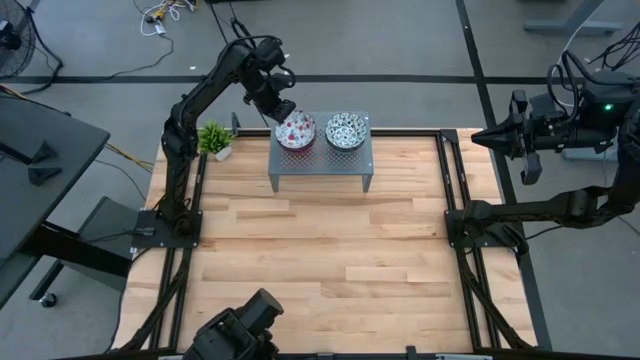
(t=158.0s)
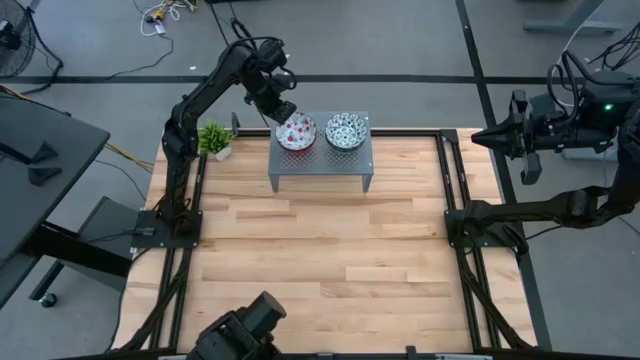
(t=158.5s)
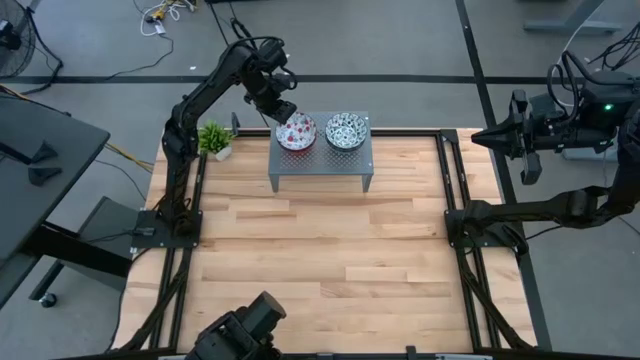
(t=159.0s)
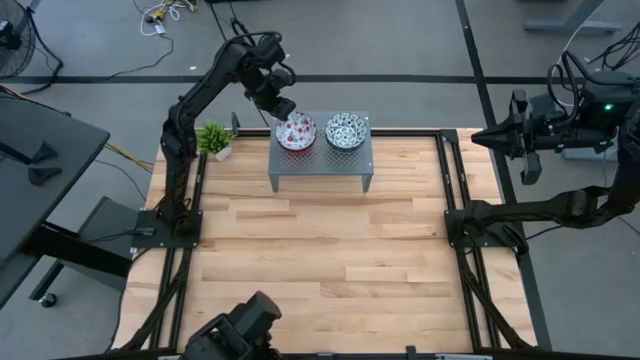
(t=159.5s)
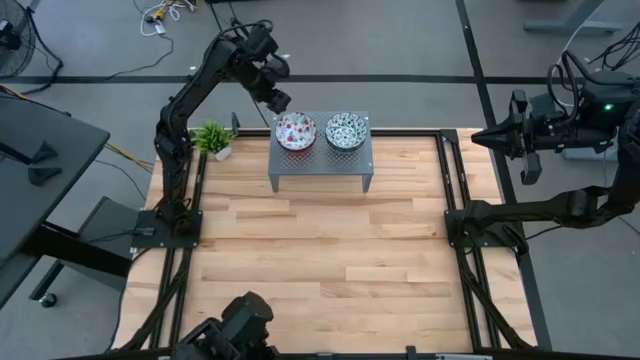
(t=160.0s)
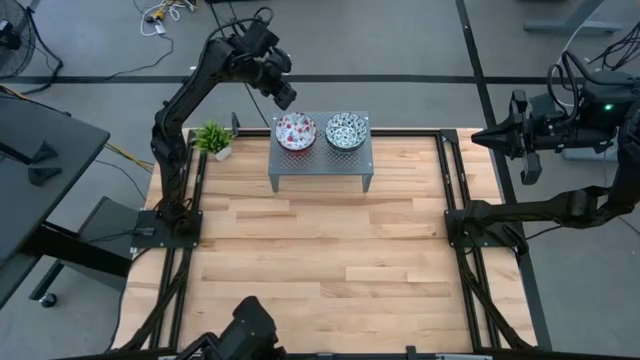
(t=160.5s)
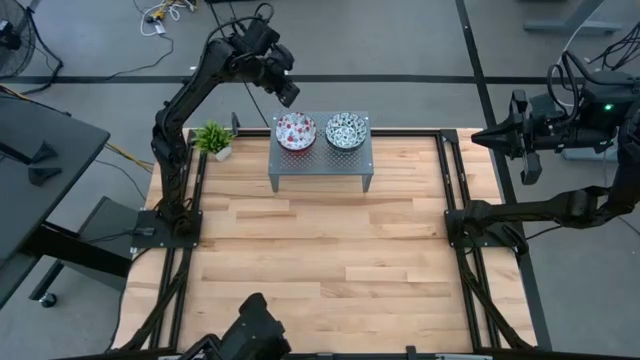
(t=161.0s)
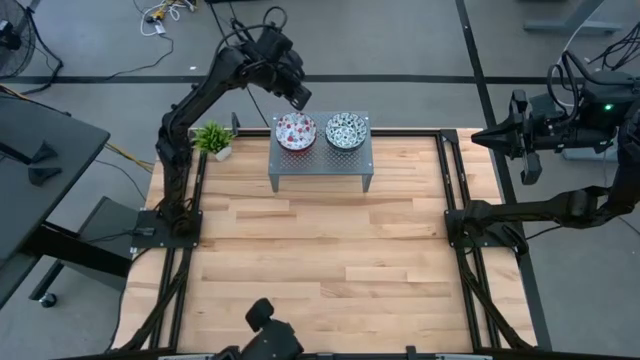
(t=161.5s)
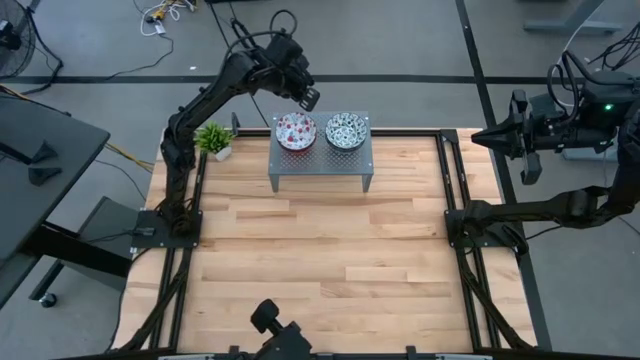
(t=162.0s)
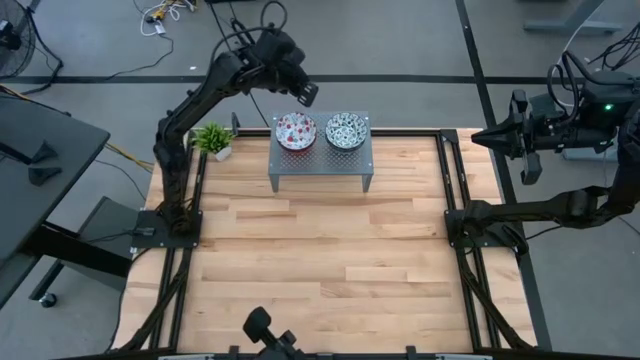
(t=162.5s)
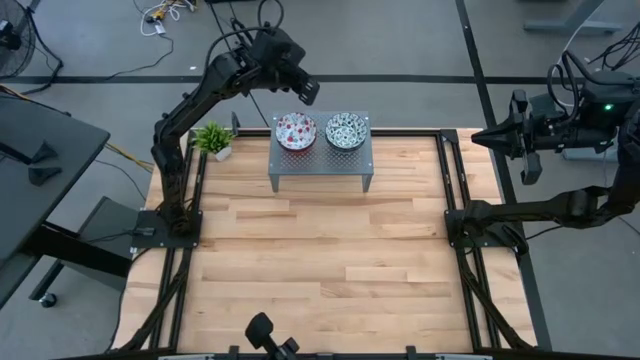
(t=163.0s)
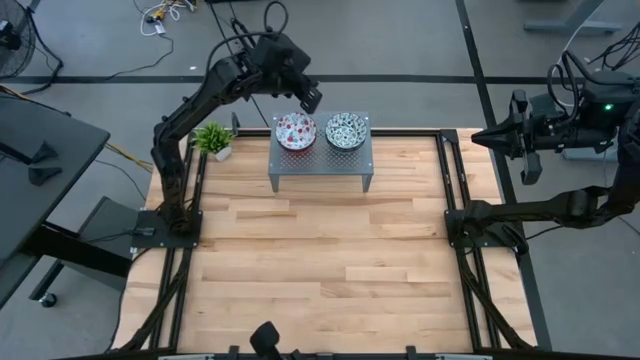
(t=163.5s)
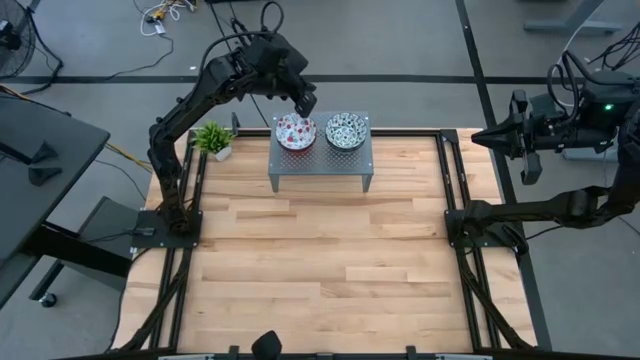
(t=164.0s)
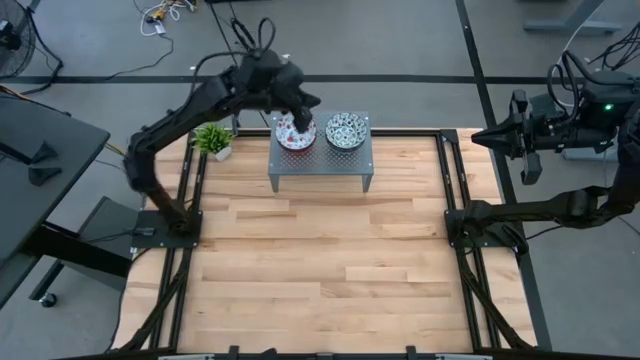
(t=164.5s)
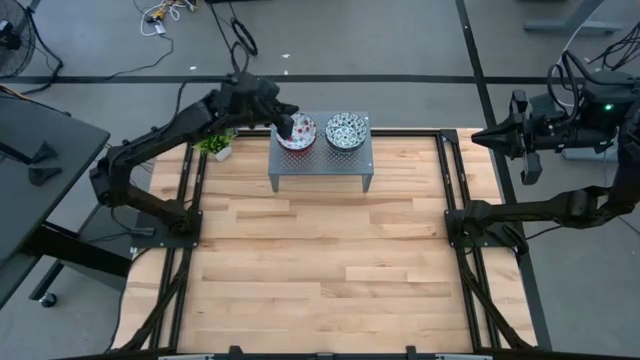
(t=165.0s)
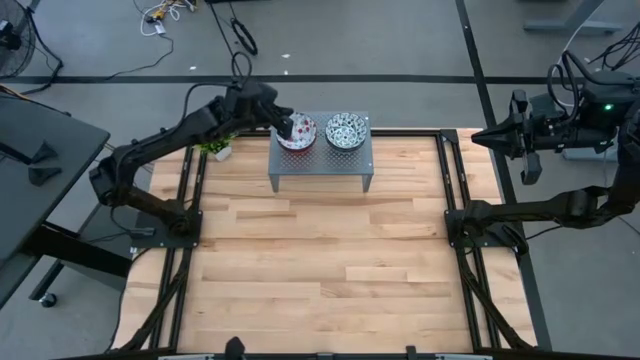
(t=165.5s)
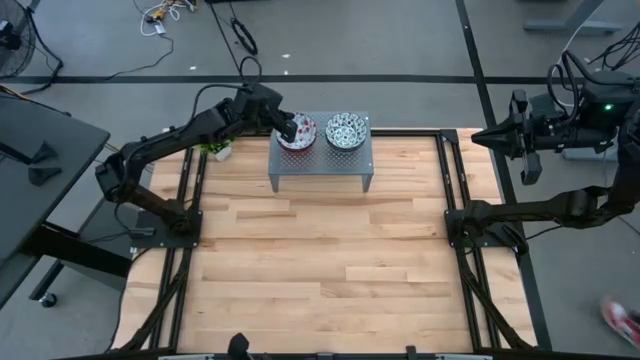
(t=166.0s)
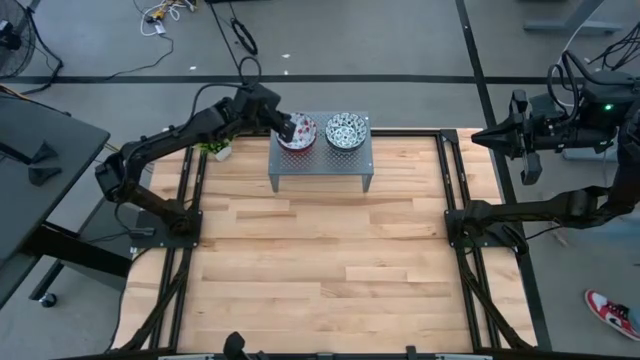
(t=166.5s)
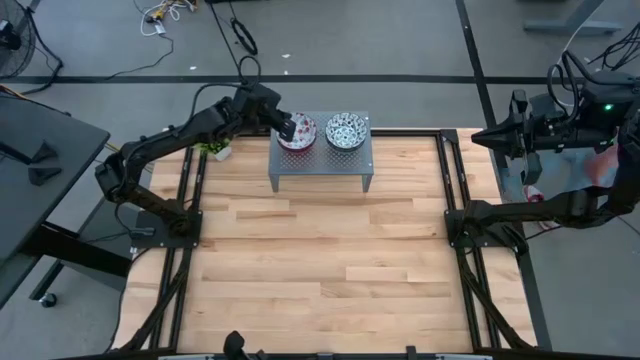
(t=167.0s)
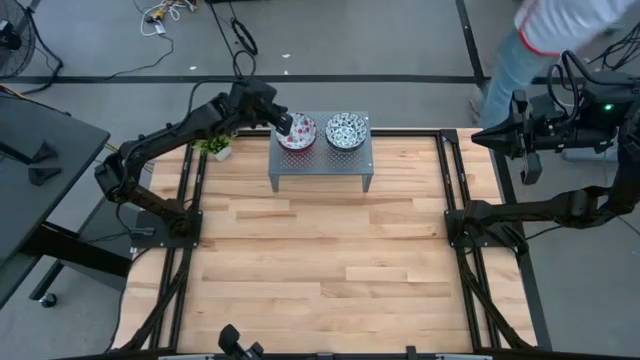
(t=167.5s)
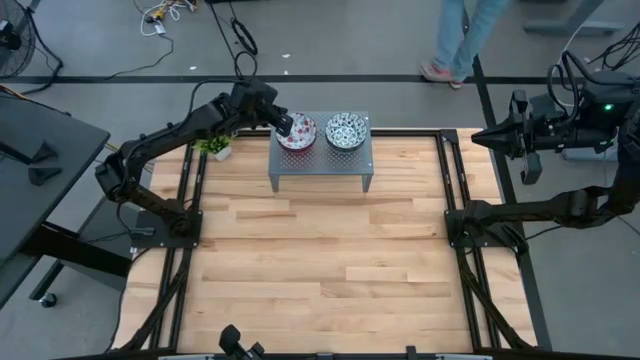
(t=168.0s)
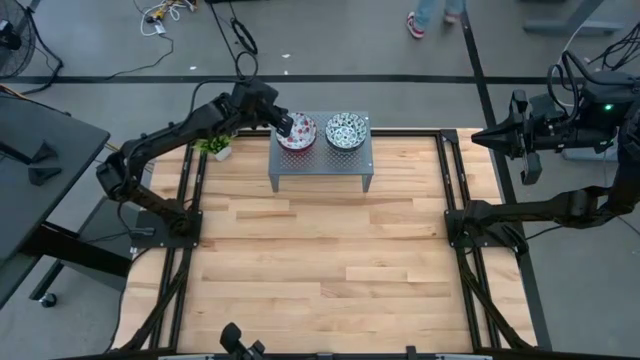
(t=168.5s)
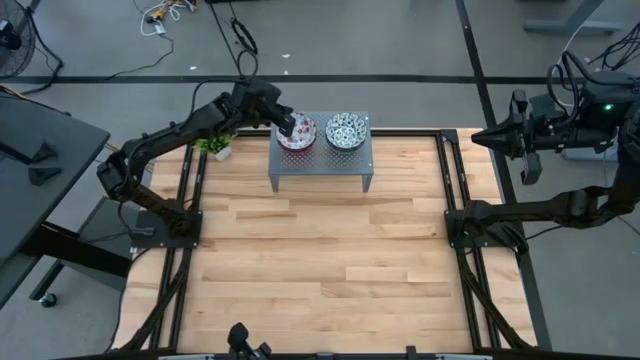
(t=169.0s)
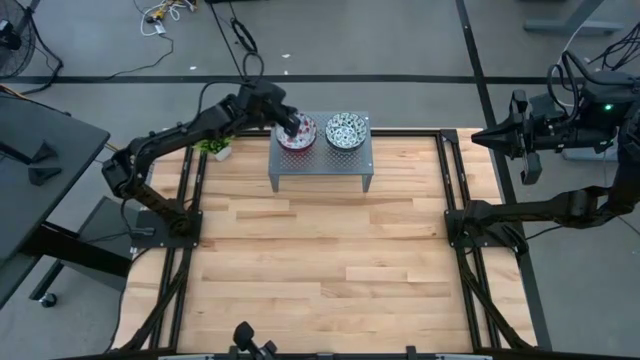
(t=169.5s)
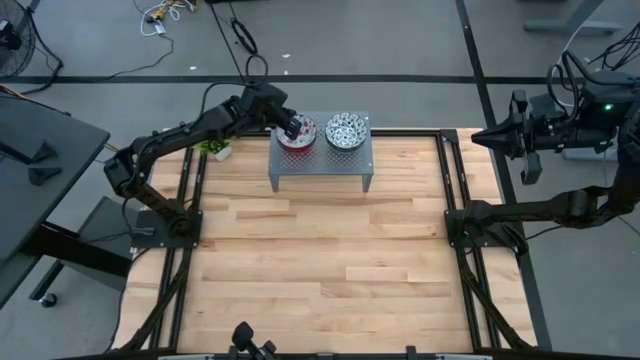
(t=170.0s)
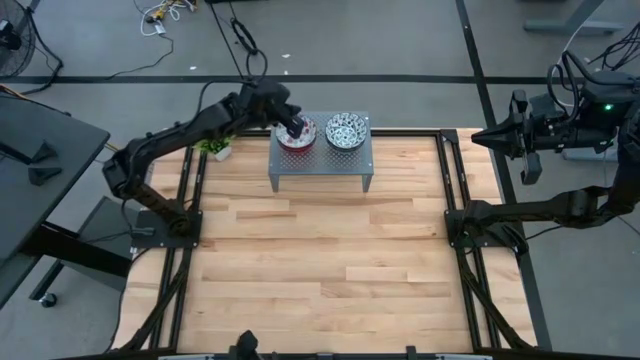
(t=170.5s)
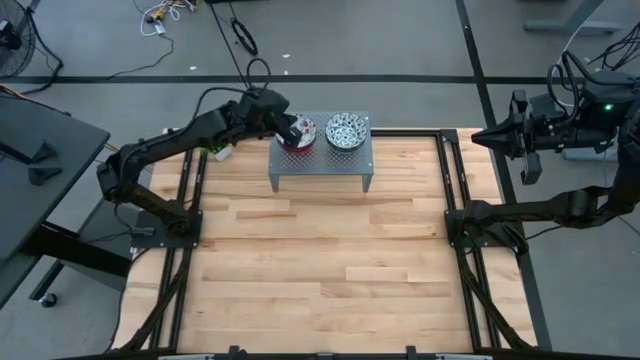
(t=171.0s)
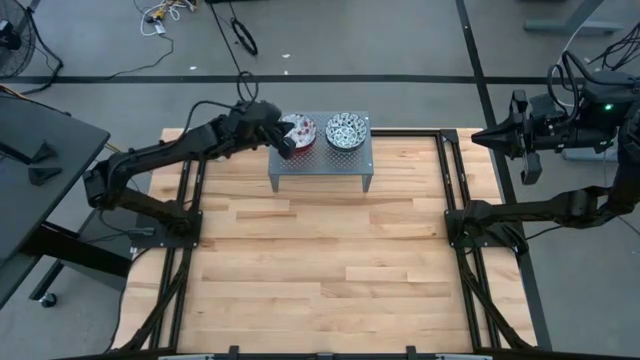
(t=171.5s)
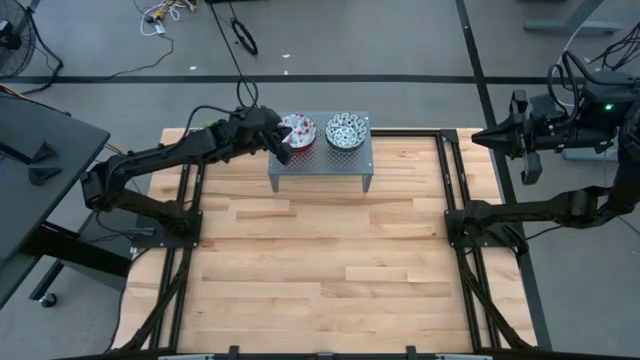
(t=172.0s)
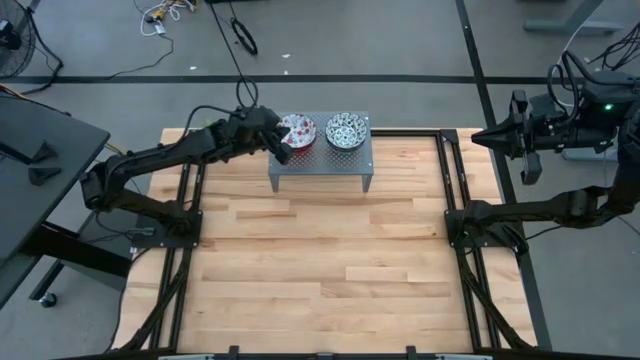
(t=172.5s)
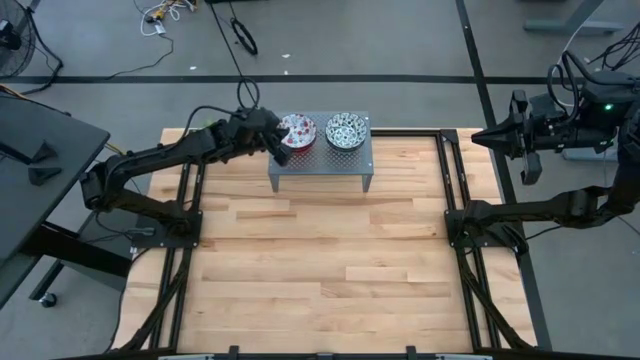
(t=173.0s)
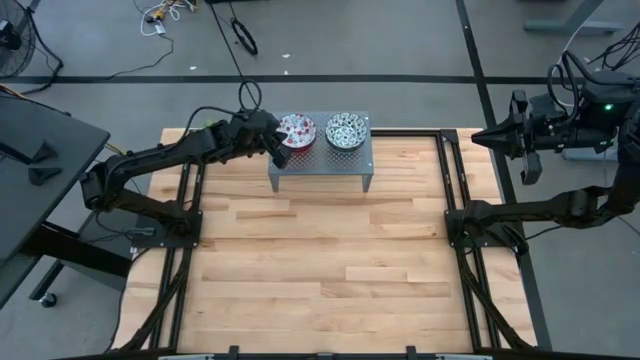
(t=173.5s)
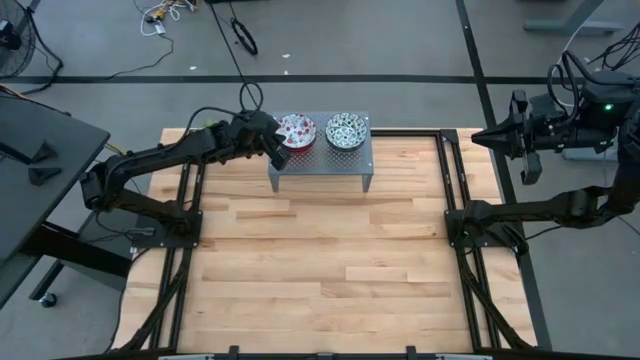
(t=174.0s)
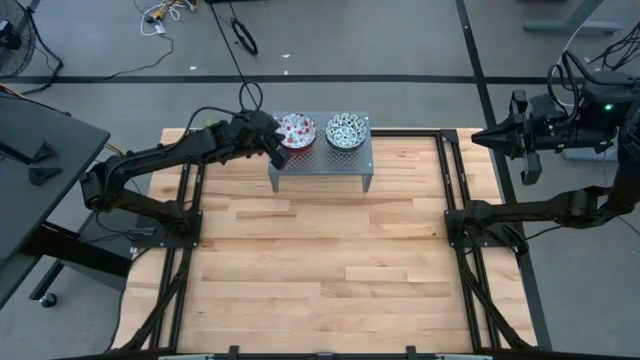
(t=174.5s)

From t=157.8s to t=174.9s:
Task: Pick & Place Mini bowls
Stack the red and white patterned bowl on top of the other red and white patterned bowls on the shelf

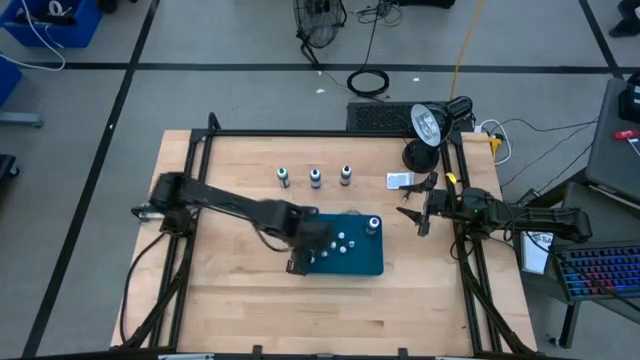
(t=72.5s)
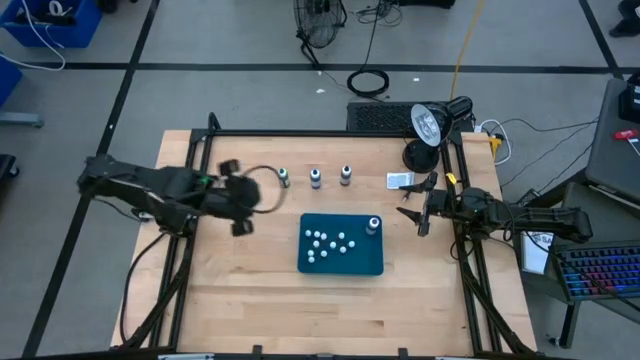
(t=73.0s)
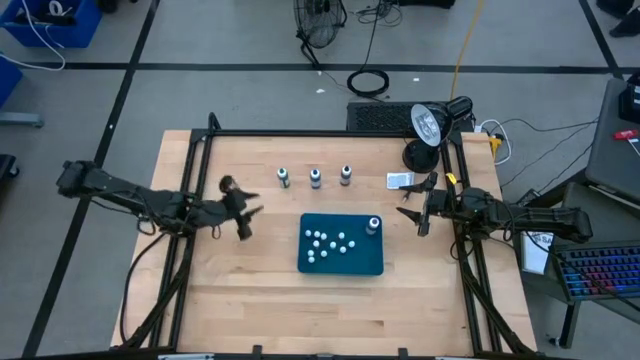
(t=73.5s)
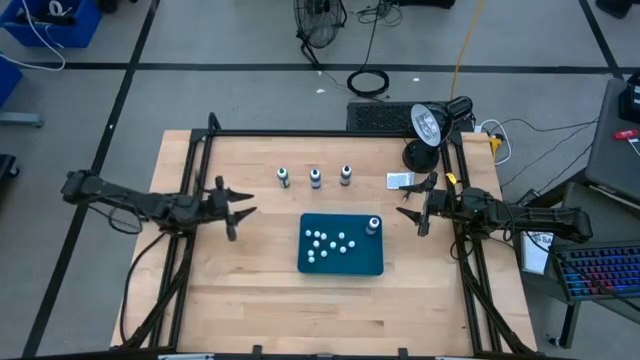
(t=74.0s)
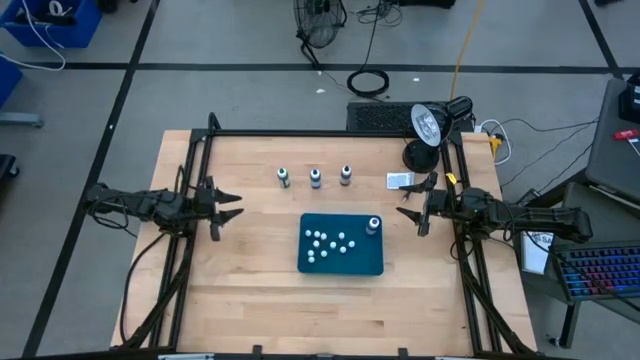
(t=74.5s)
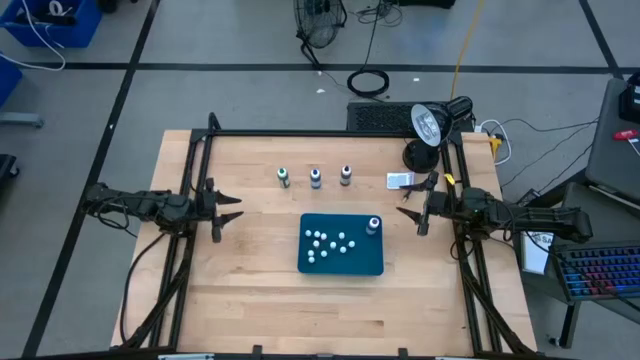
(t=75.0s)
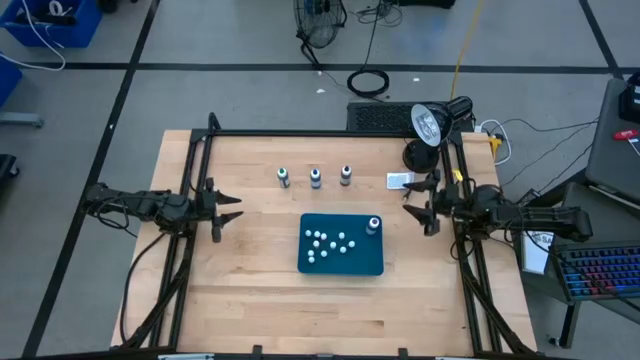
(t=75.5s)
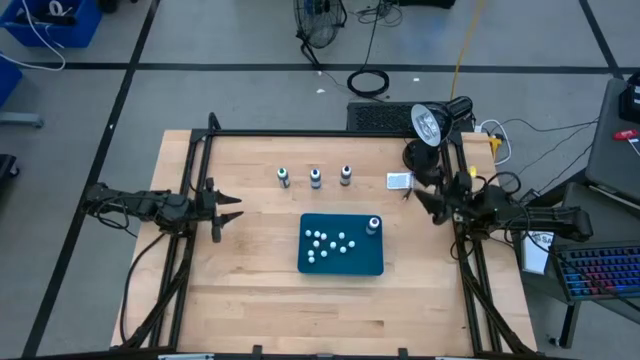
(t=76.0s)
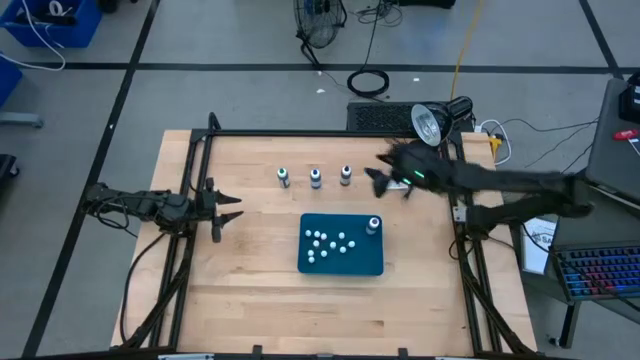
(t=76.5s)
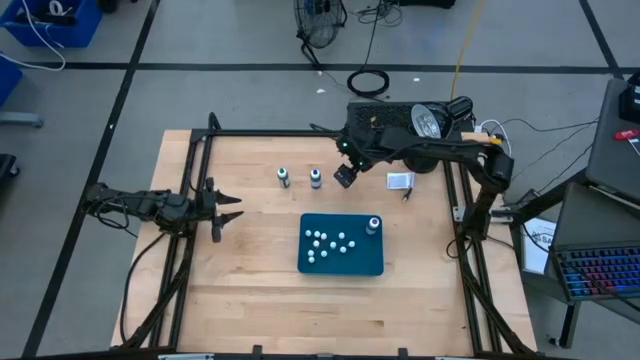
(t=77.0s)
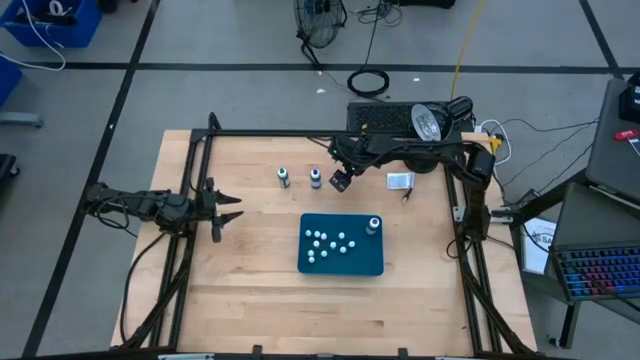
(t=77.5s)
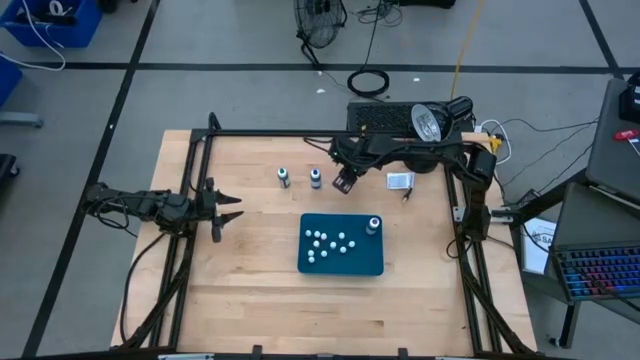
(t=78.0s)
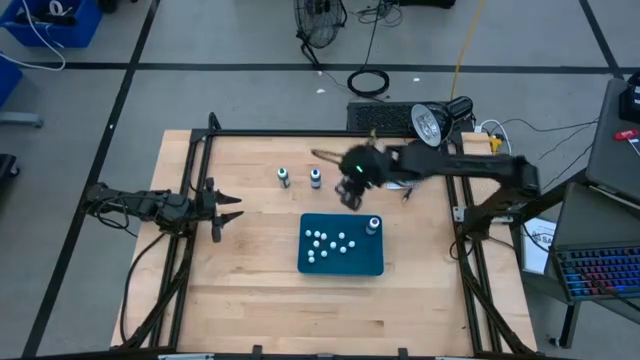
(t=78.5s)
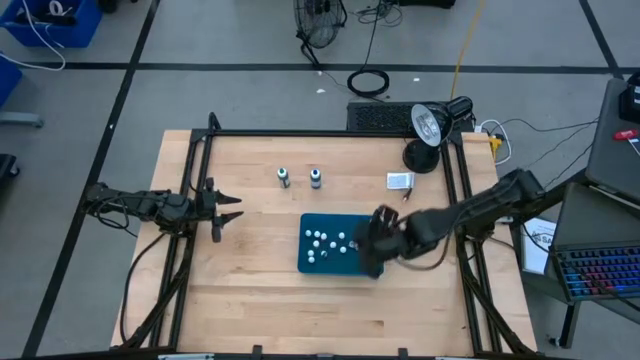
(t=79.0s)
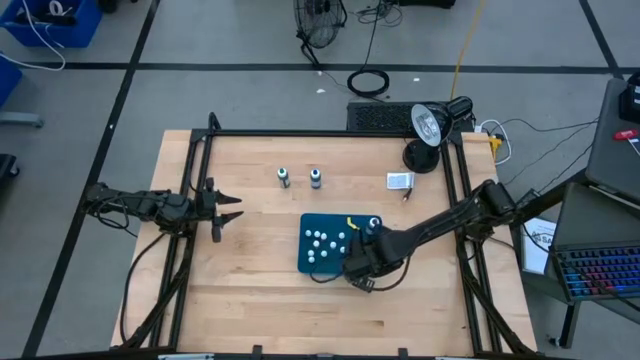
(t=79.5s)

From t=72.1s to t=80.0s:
Task: Pick & Place food coloring
Put the large black food coloring bottle into the blue bin
